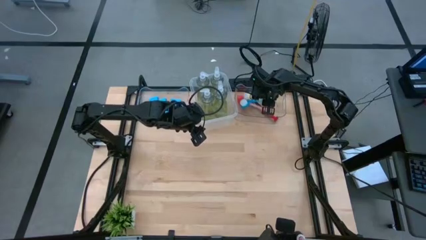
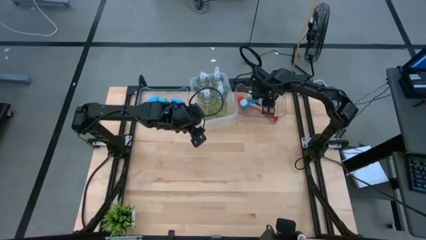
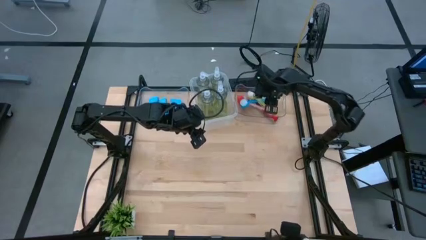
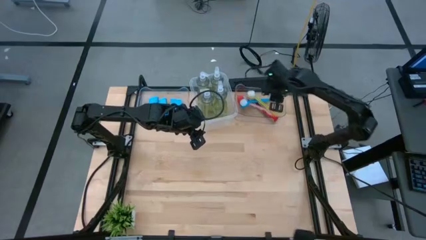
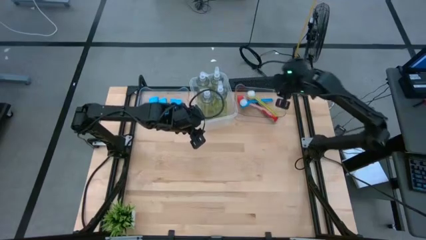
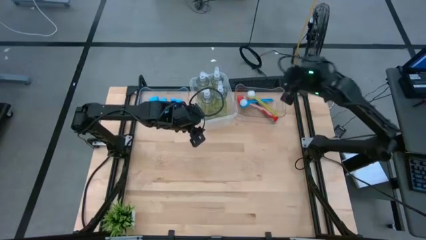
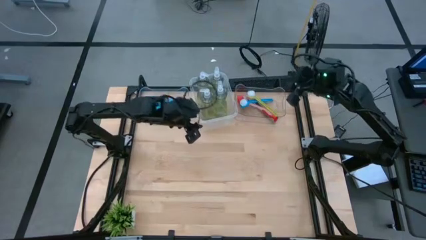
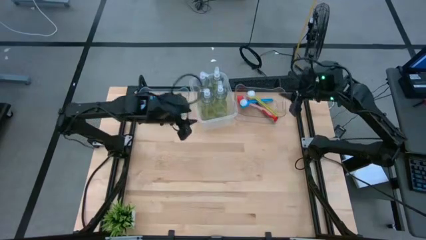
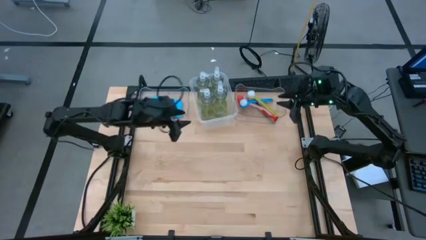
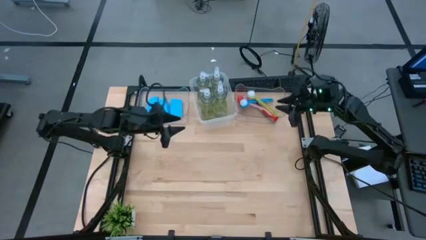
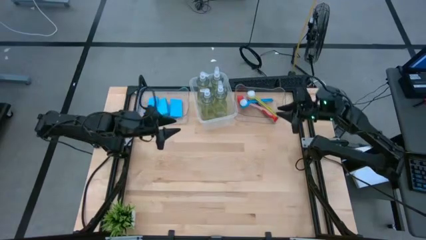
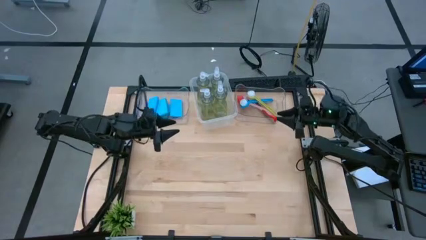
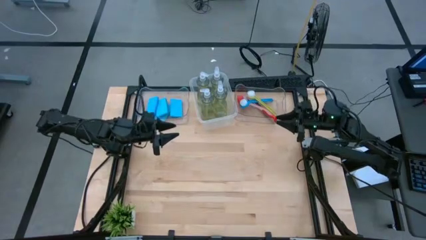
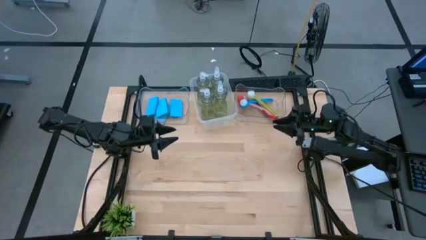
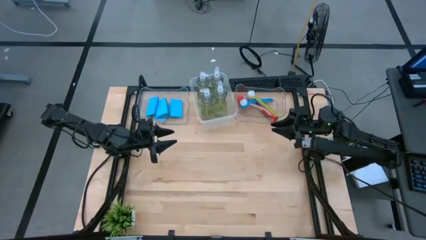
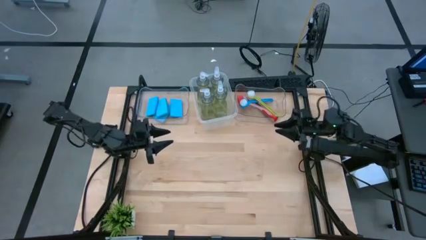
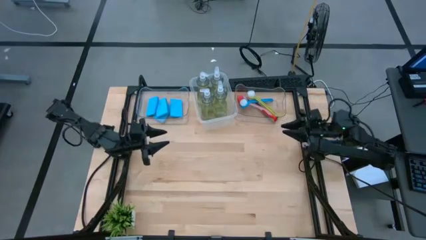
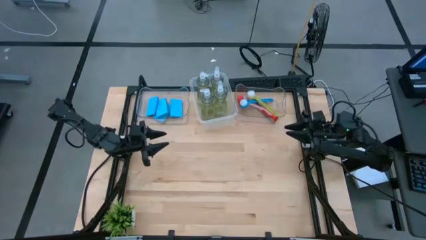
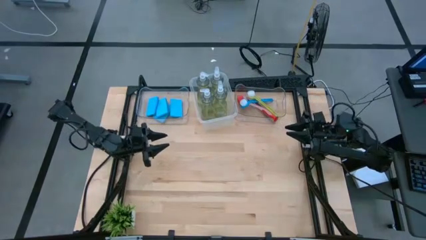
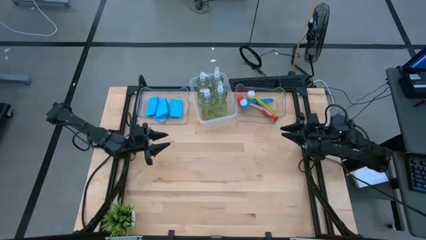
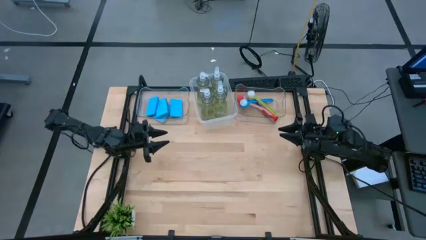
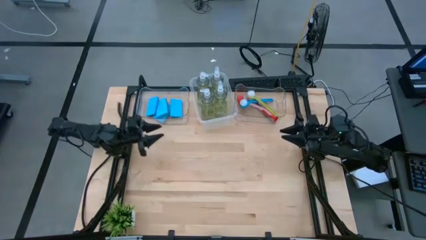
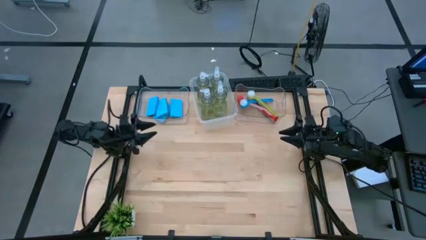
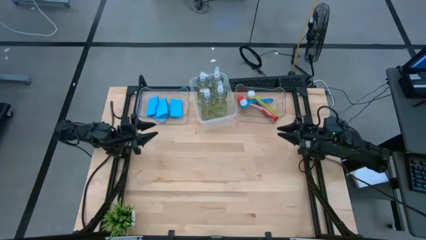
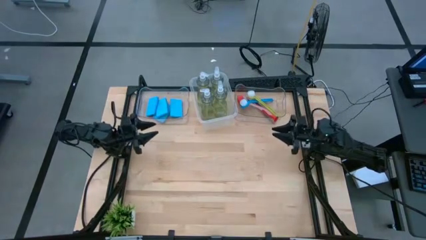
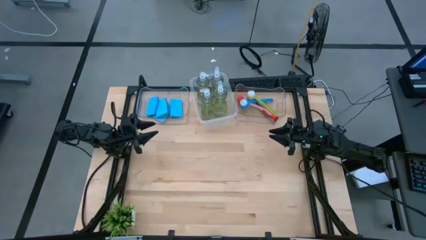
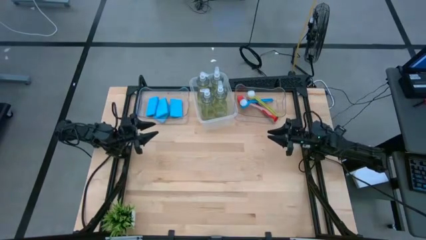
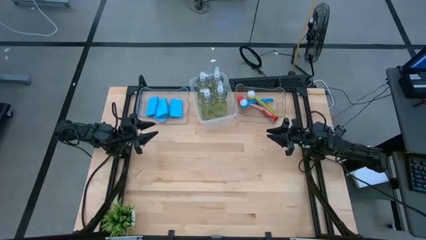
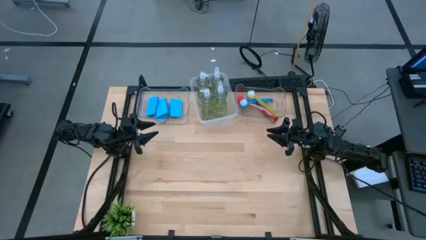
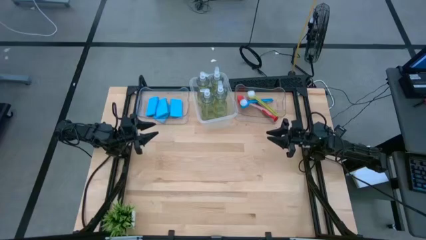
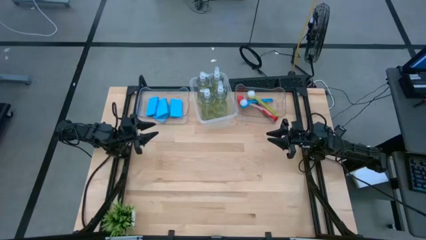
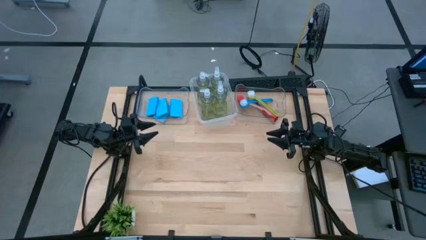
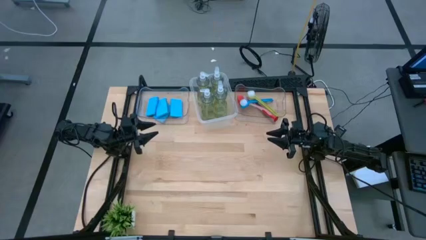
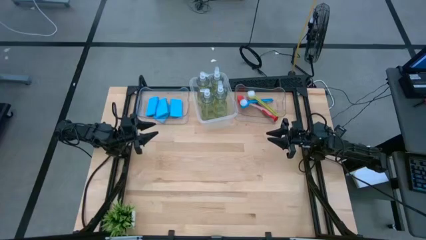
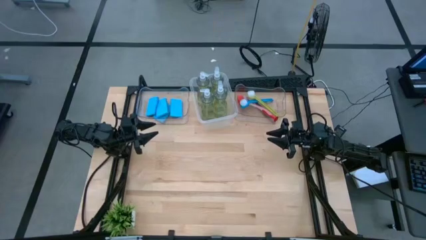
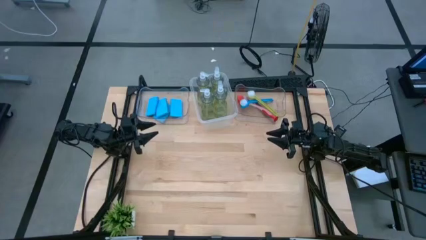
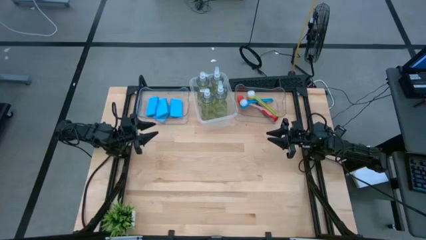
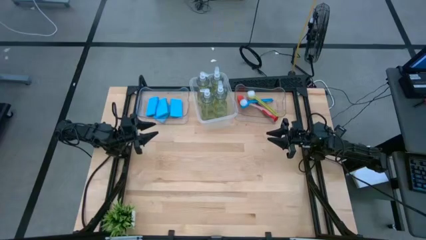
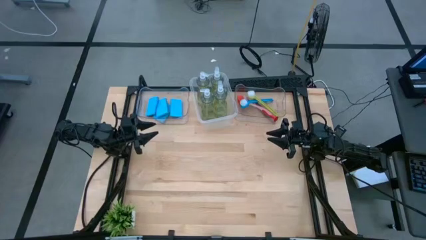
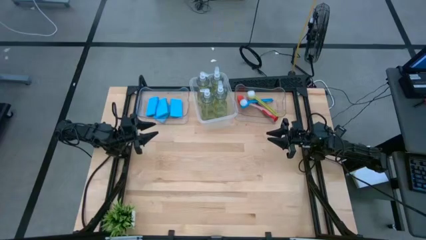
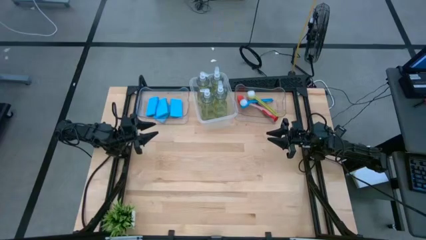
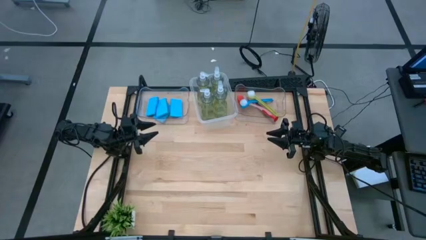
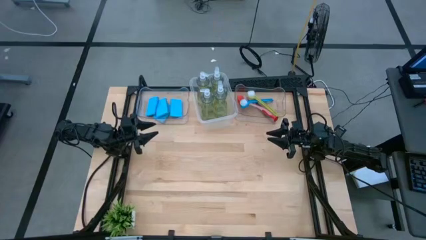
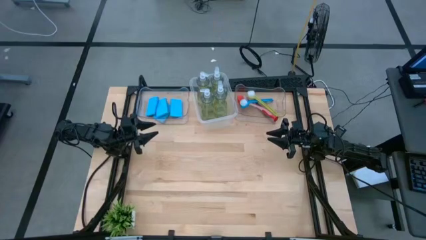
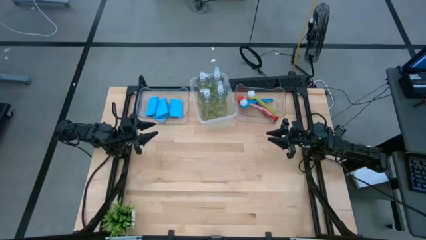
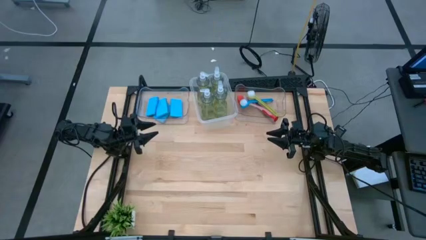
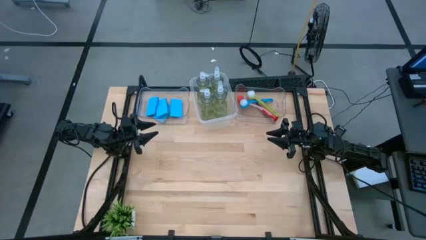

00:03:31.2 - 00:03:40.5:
Task: Pick & Place Kitchen Sink Supplies
Return to Home Position

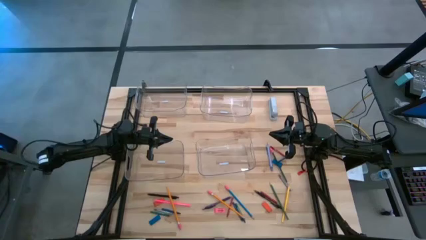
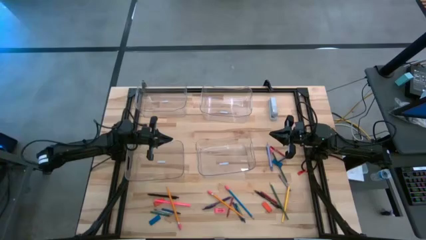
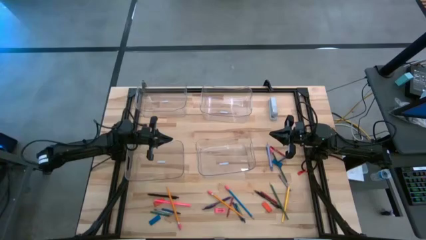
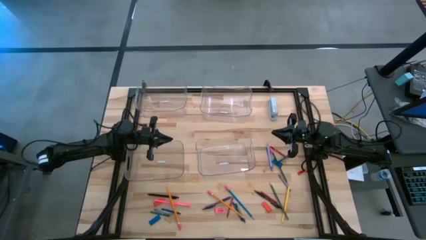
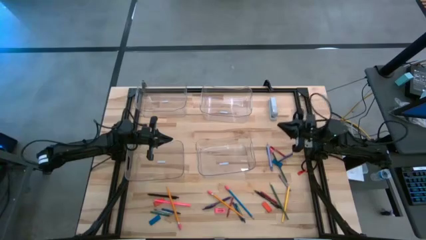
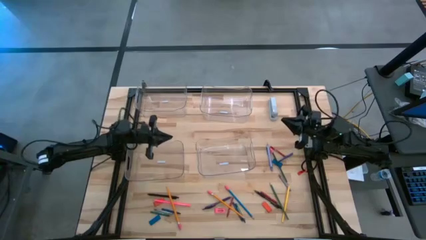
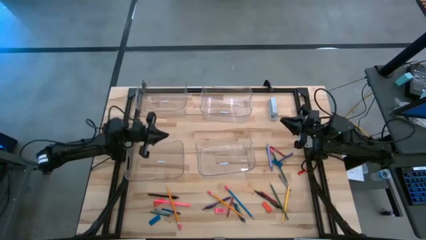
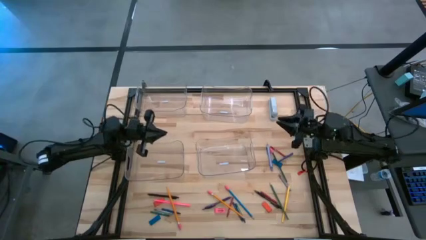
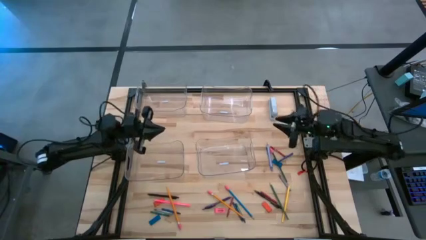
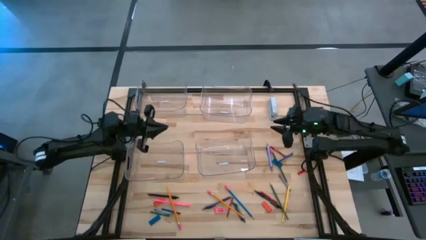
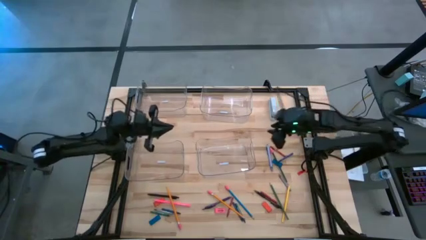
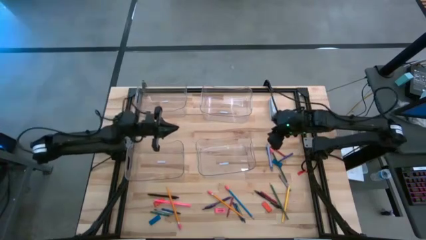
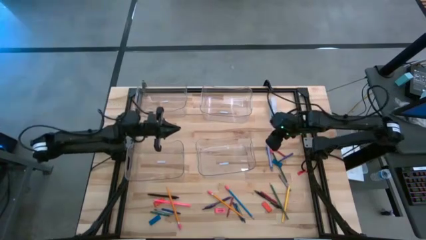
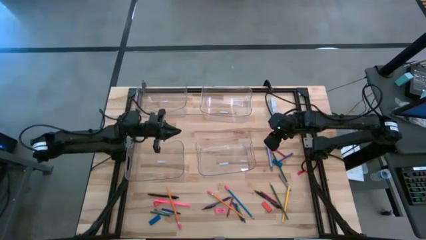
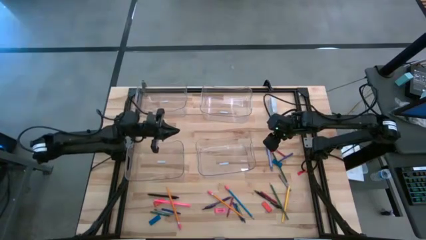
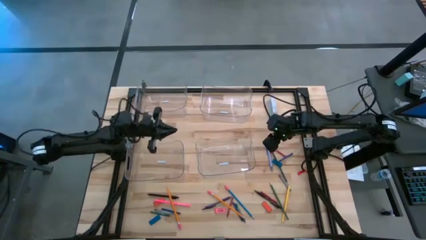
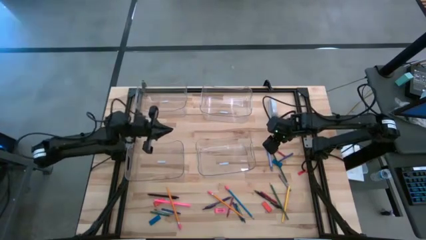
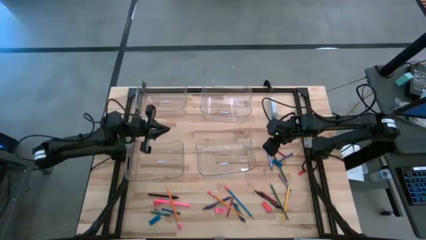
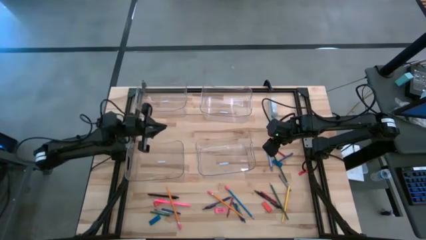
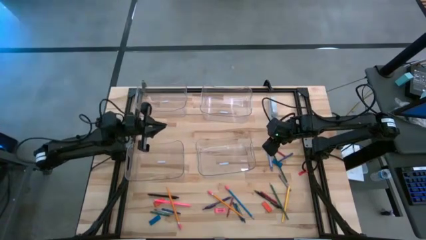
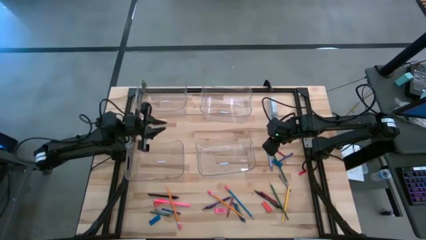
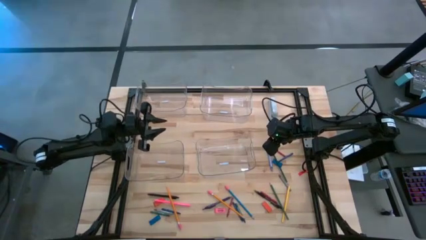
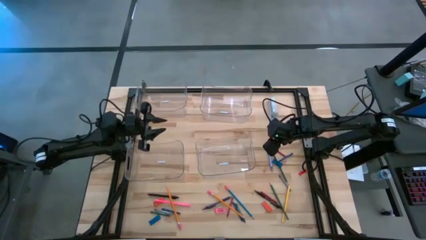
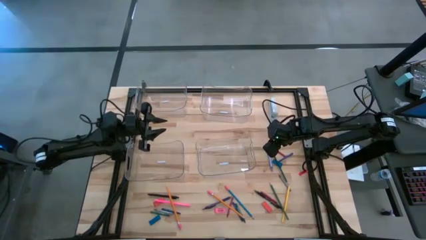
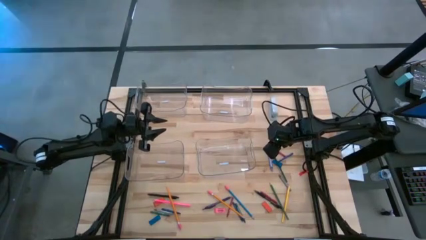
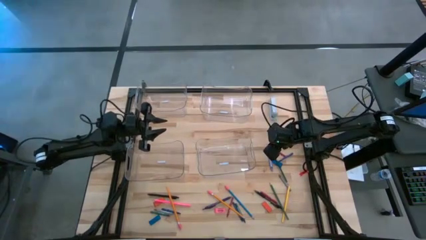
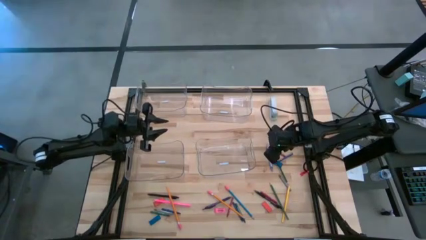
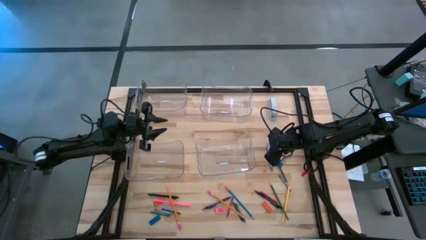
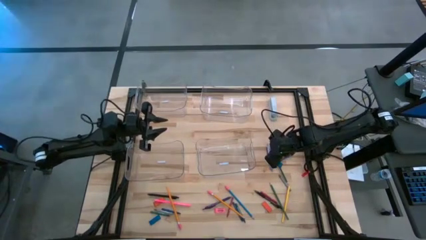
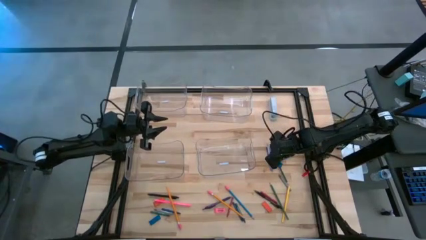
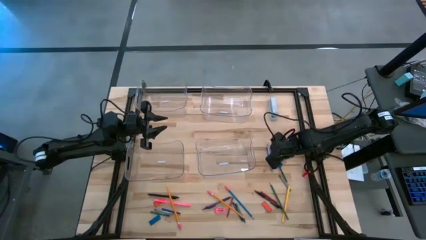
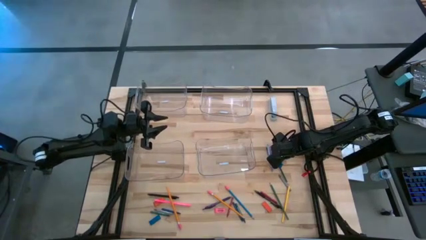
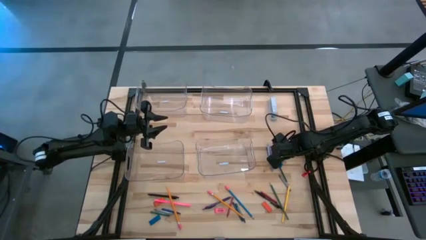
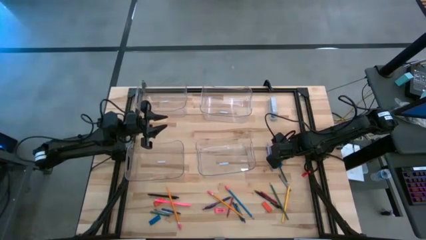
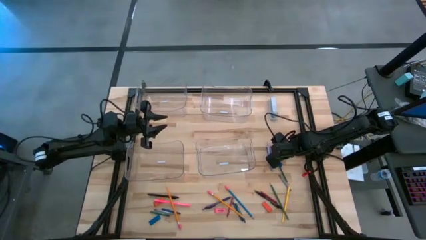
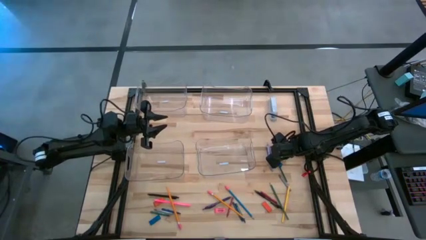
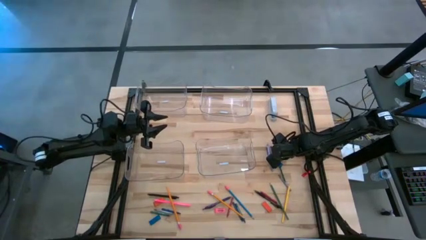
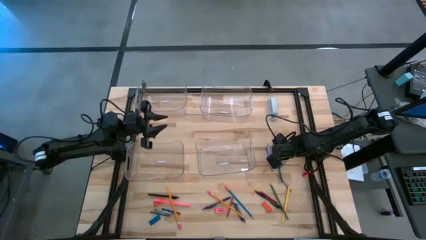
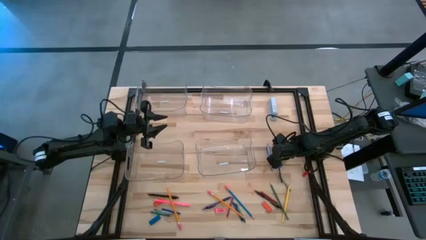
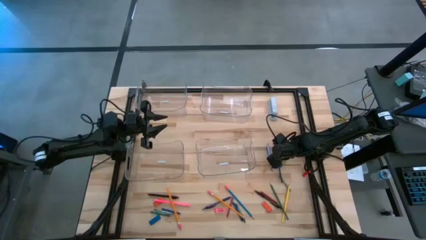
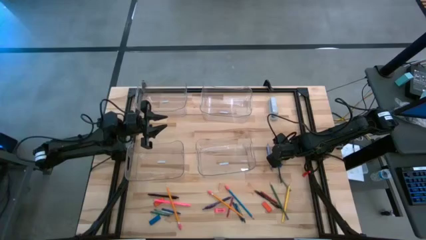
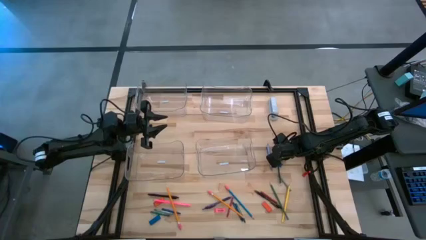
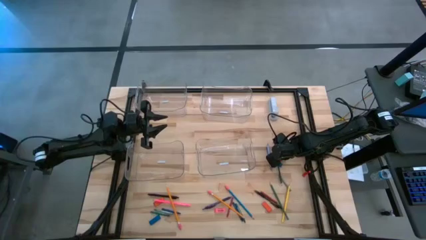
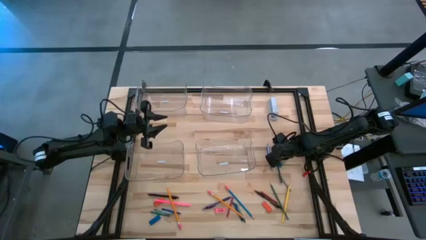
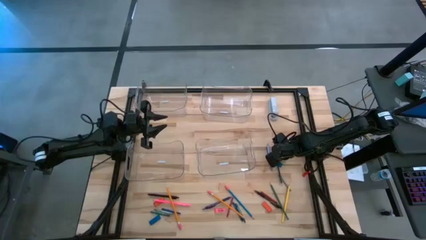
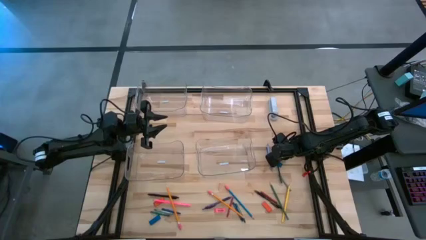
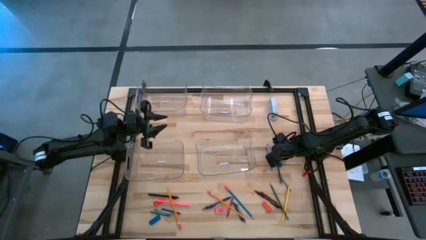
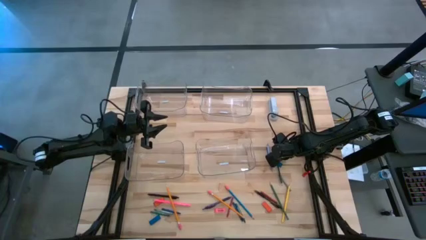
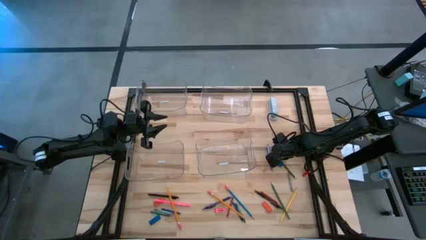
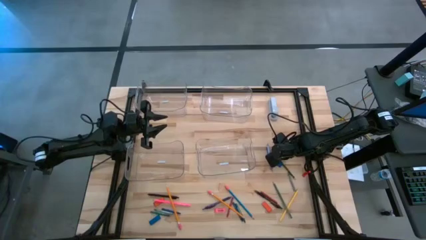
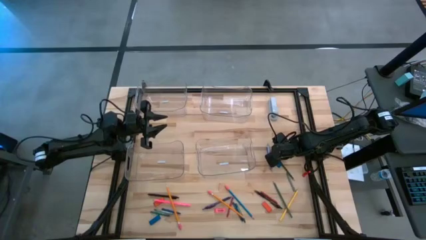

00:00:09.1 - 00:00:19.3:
Task: Sort crayons/erasers/pens/pencils in bins
Put the dark green pencil into the bottom right transparent bin
